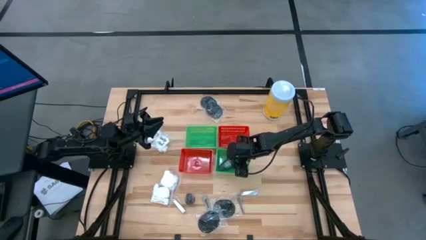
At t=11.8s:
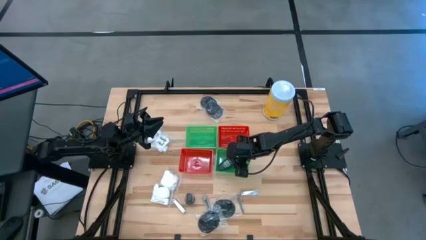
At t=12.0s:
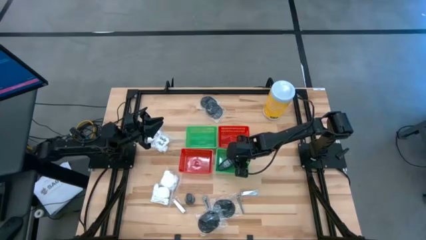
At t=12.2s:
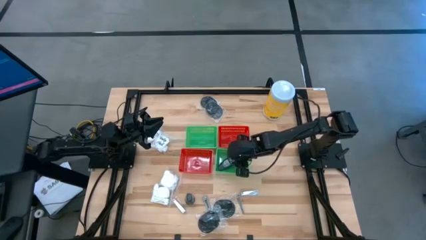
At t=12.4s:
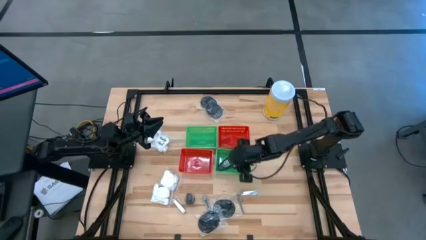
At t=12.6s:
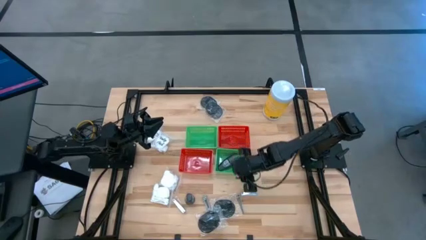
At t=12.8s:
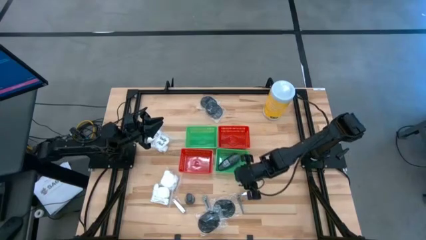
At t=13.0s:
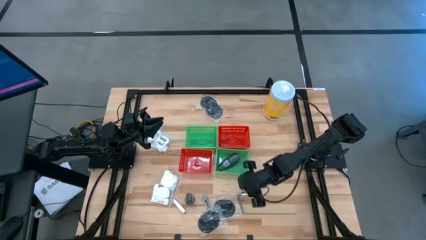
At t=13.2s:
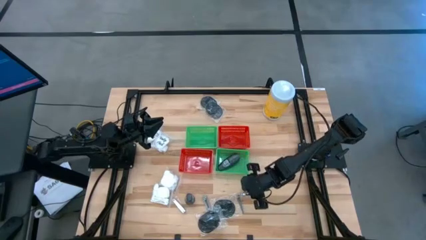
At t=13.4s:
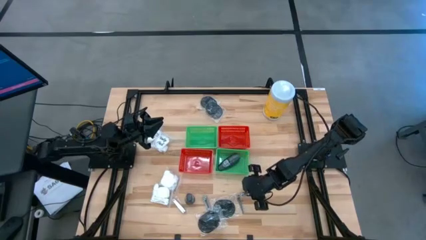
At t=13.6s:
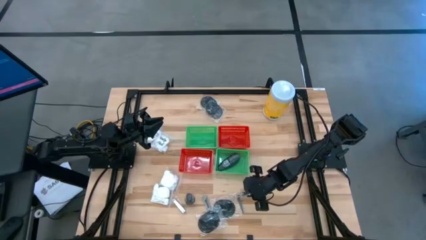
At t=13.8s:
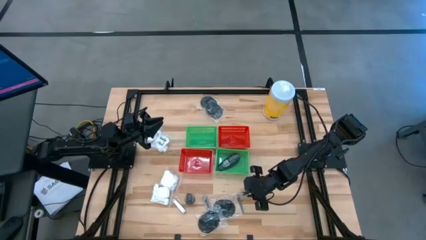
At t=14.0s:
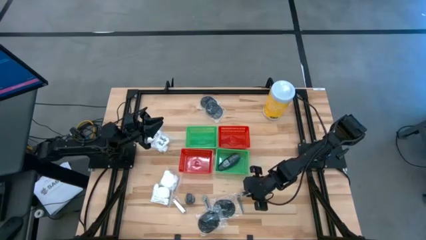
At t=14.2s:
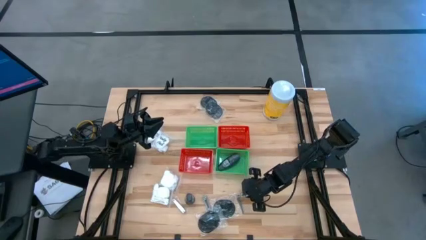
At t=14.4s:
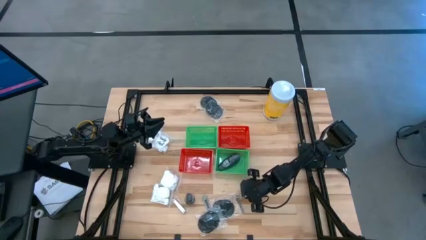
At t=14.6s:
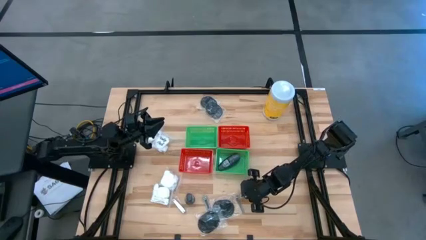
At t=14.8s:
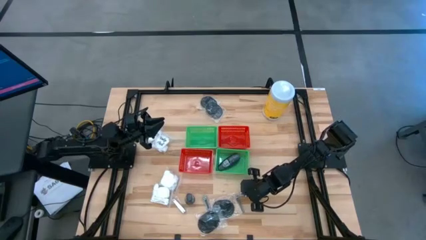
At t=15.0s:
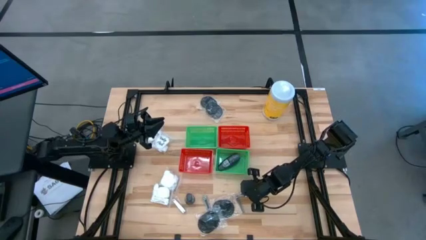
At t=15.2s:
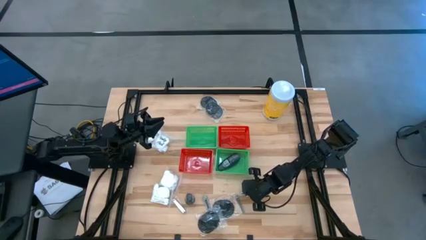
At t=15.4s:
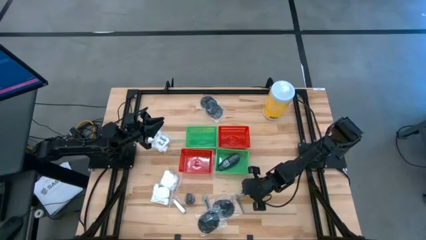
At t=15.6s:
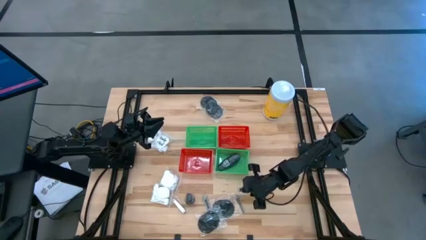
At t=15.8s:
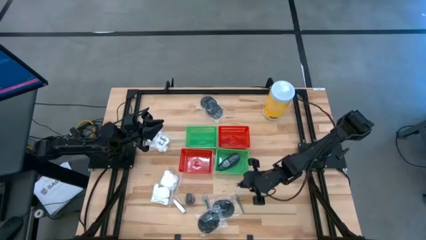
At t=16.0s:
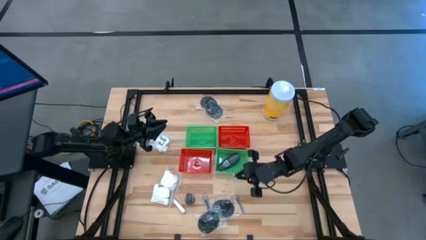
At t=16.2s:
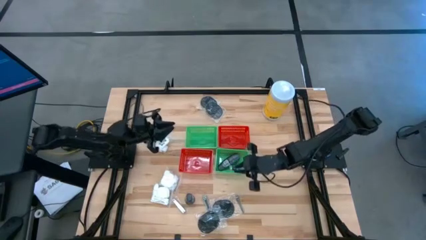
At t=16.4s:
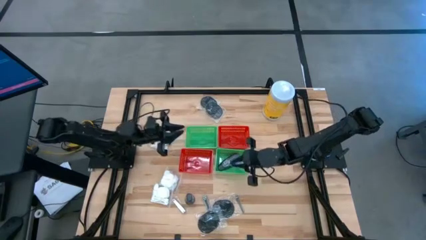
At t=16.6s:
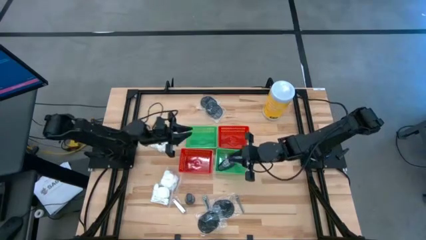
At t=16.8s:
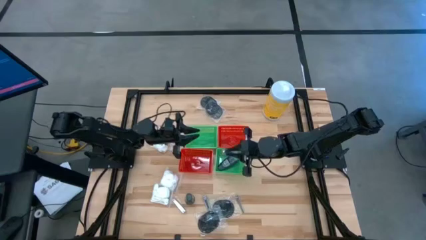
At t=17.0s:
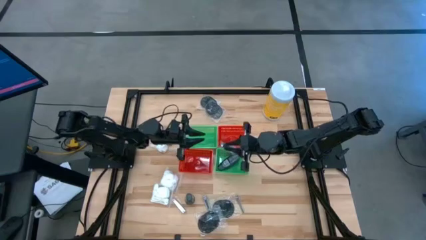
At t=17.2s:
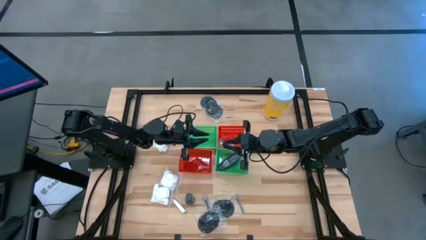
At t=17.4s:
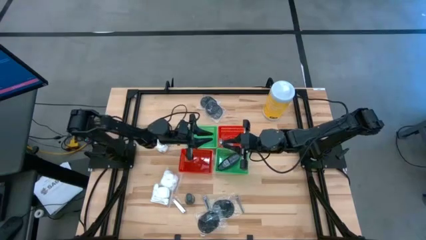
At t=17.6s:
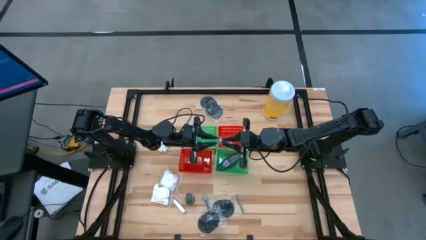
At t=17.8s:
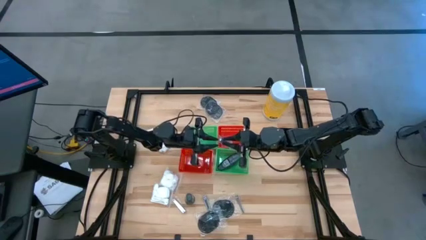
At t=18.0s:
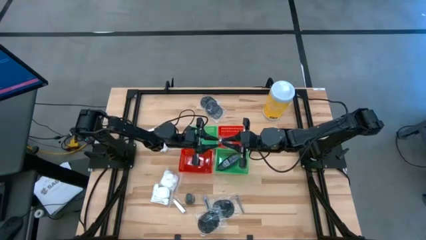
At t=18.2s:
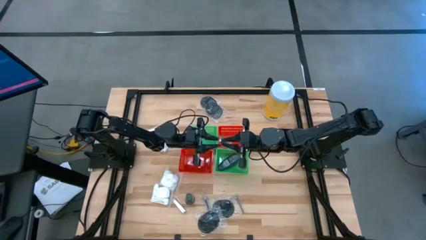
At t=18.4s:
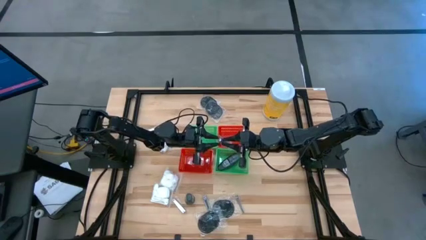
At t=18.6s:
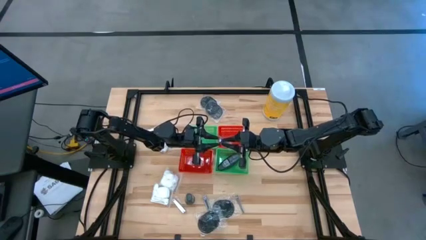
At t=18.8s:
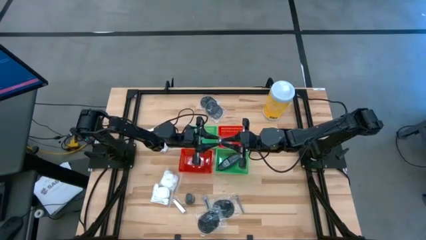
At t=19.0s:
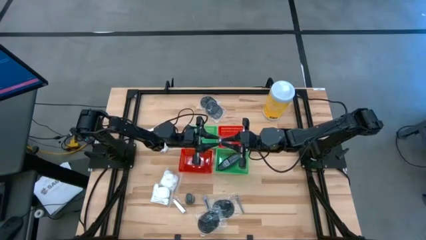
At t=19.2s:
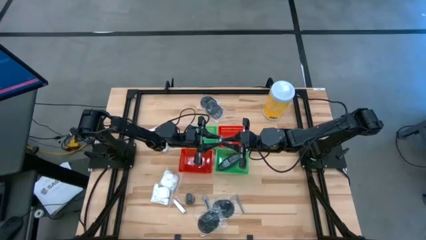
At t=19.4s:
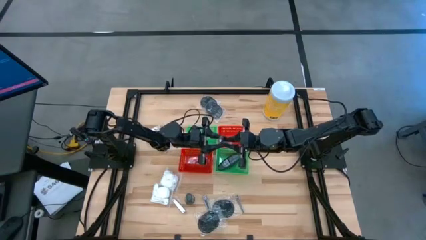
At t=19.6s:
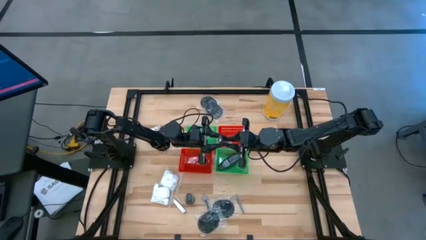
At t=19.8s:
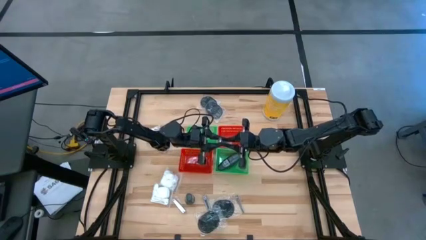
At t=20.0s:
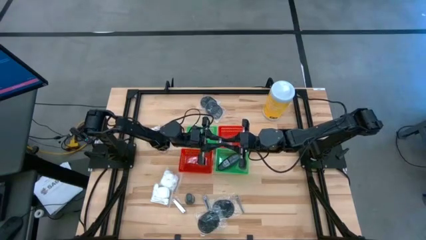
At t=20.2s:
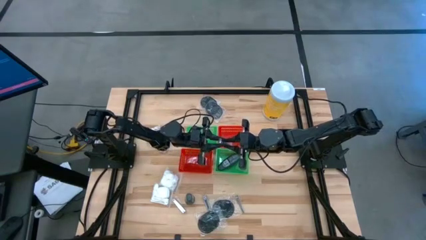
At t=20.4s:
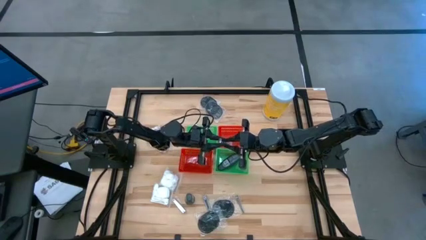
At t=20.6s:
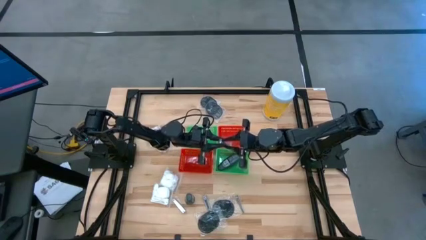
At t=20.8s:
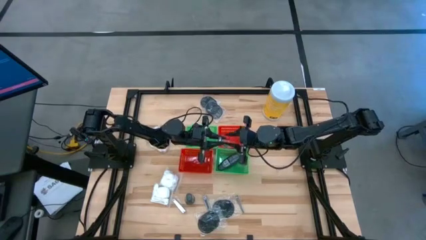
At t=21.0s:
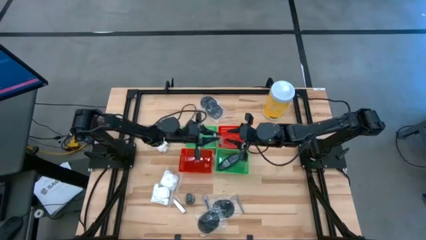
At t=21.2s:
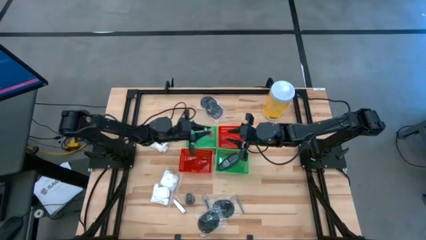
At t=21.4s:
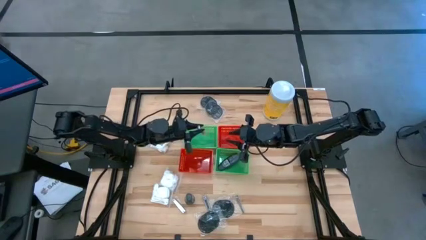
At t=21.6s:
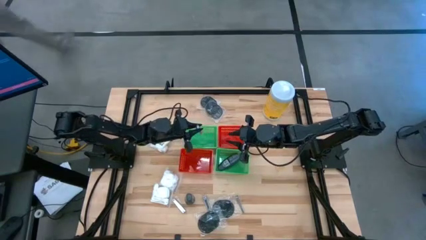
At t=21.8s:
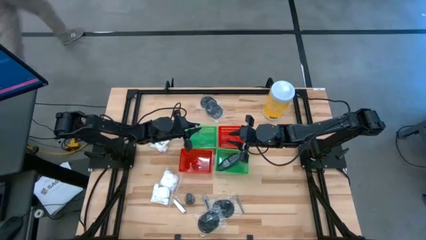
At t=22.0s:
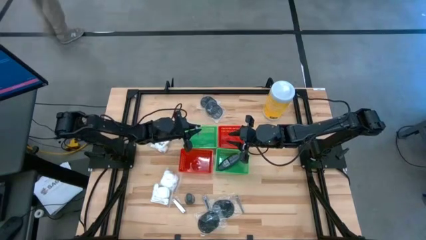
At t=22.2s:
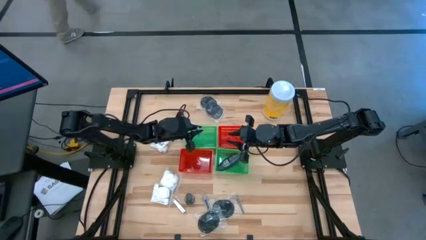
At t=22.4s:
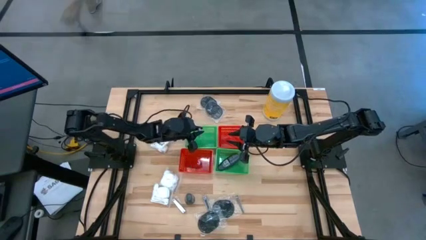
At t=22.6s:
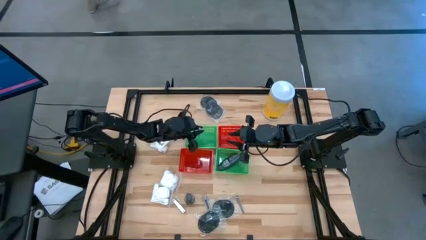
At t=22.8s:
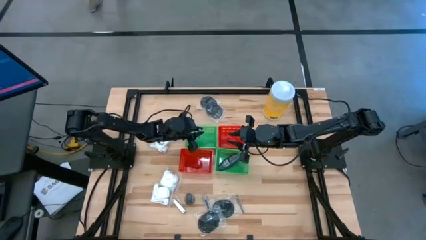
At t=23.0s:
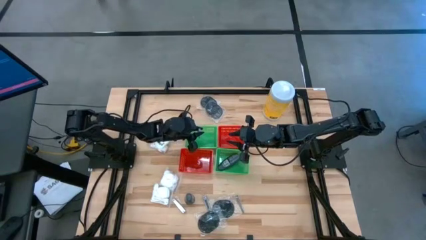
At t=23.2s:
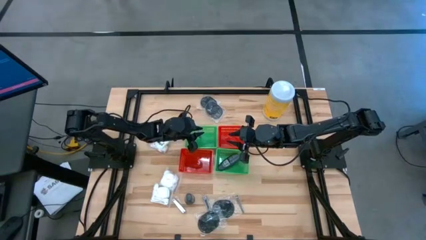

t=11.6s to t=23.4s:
Task: Pick & Place Travel size toiletries
Put the silver nail cutter into the left green basket

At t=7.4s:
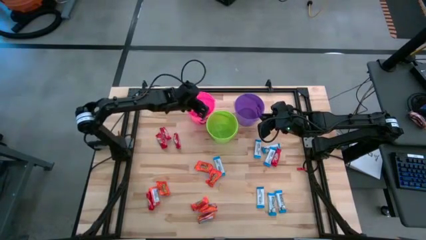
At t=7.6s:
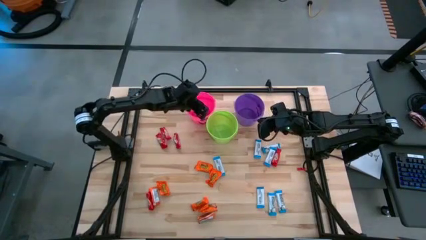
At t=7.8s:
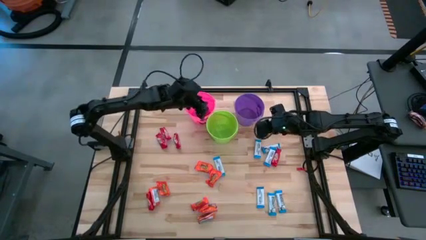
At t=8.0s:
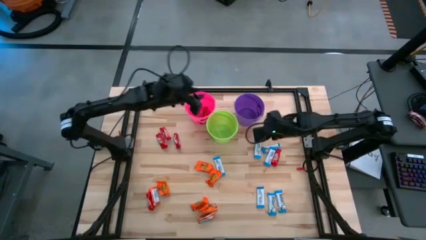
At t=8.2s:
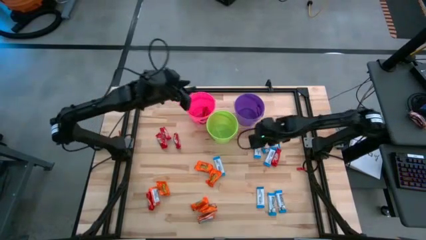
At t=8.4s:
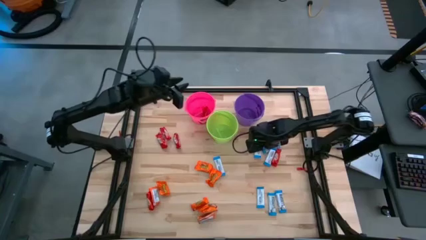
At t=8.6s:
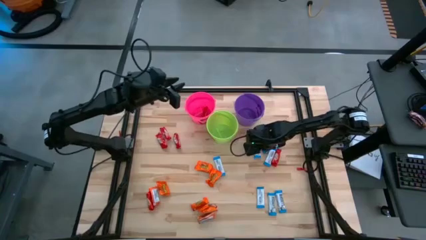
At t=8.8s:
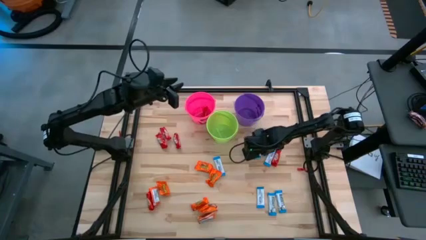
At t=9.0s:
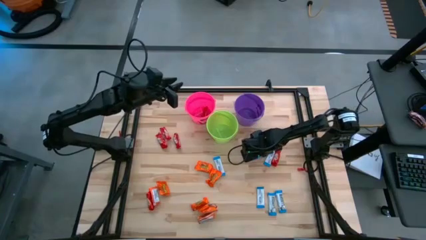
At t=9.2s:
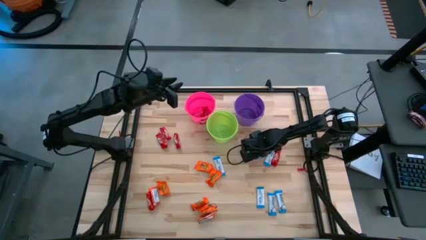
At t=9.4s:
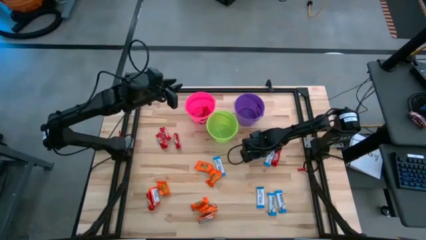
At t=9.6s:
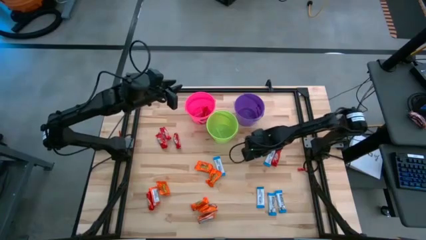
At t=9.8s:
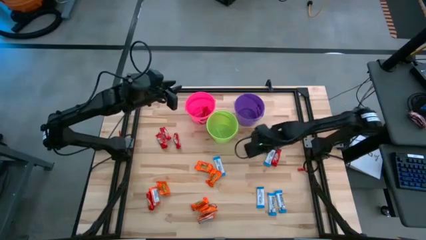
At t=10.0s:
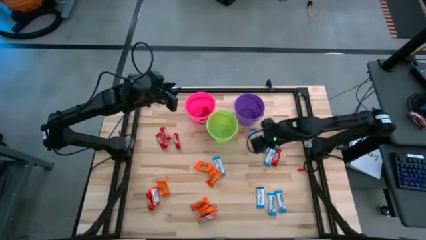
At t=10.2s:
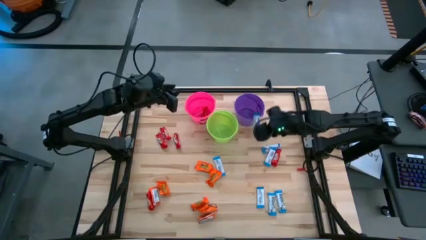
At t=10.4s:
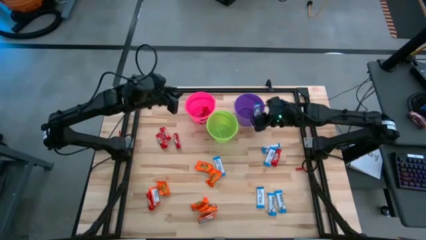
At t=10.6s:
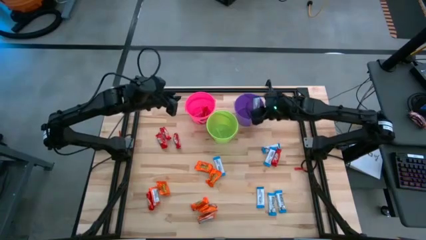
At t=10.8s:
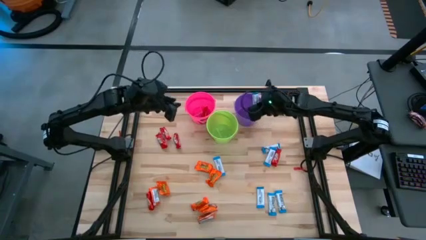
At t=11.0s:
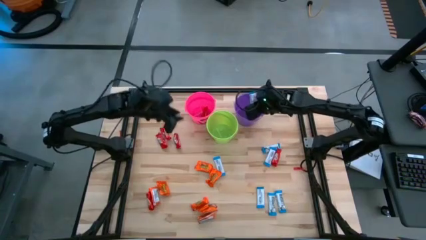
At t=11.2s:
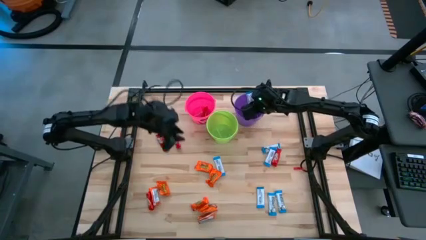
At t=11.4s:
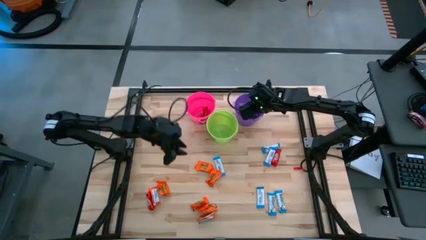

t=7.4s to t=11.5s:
Task: Sort candy
Put the blue candy into the violet bin
